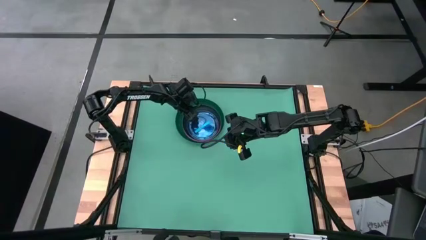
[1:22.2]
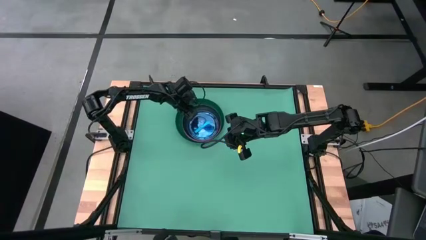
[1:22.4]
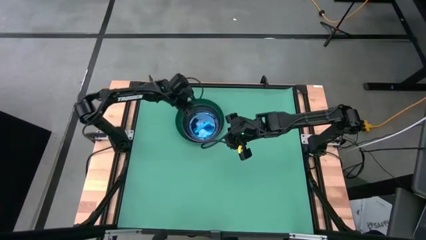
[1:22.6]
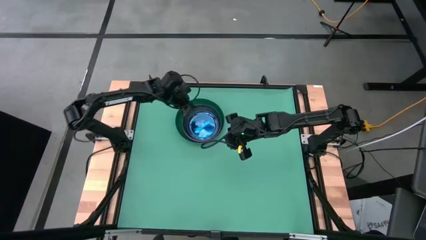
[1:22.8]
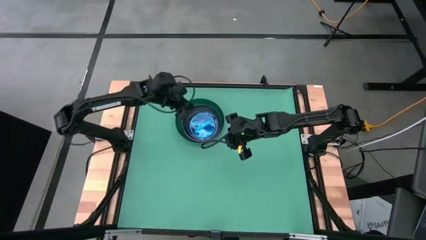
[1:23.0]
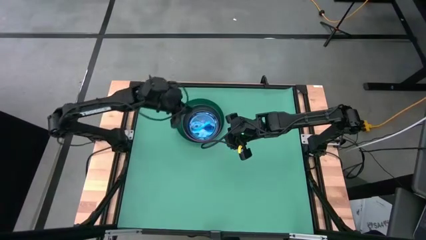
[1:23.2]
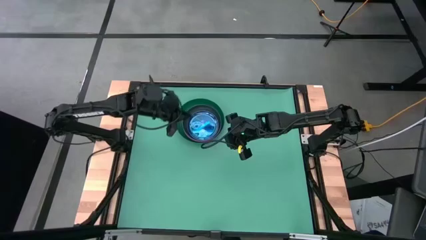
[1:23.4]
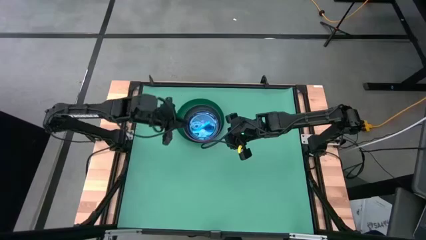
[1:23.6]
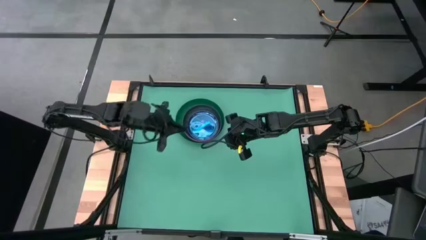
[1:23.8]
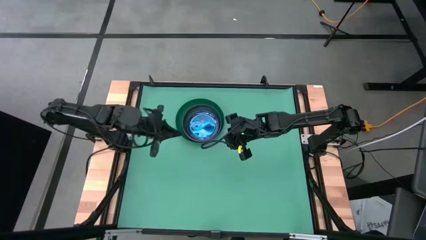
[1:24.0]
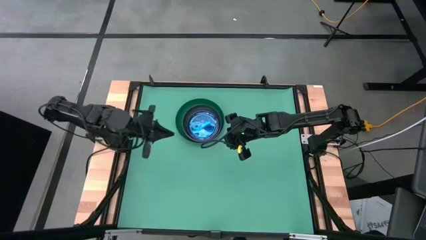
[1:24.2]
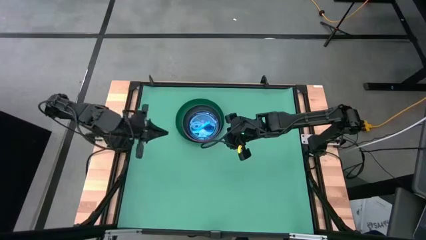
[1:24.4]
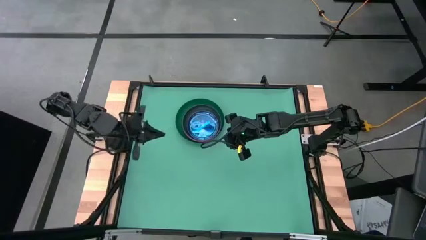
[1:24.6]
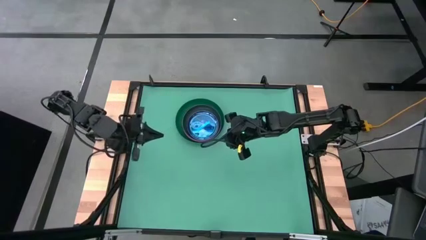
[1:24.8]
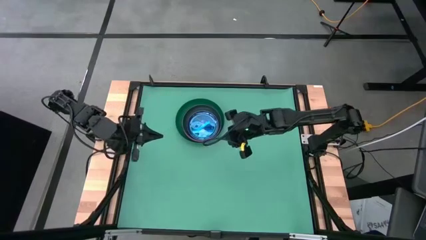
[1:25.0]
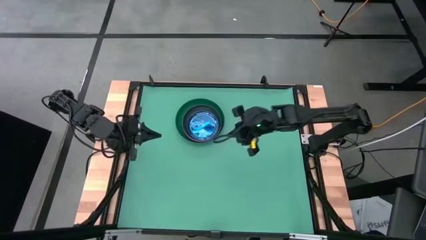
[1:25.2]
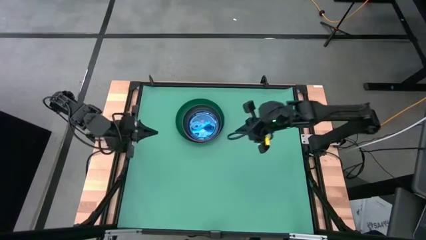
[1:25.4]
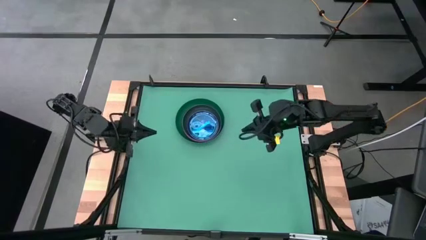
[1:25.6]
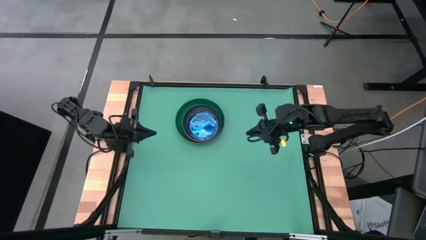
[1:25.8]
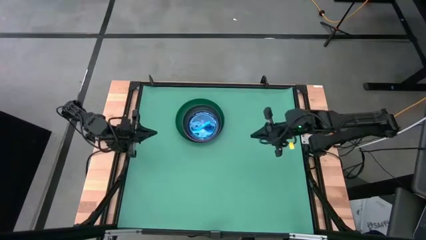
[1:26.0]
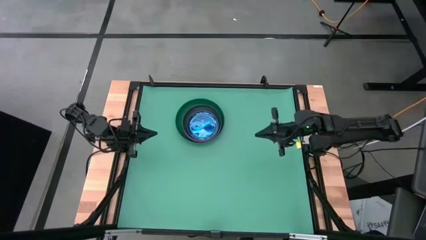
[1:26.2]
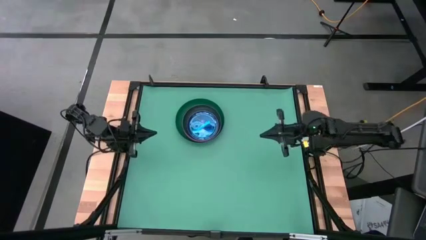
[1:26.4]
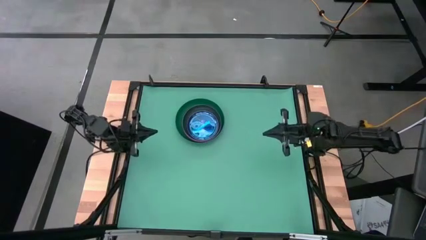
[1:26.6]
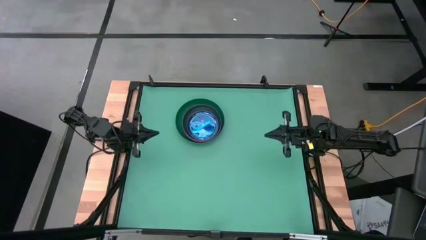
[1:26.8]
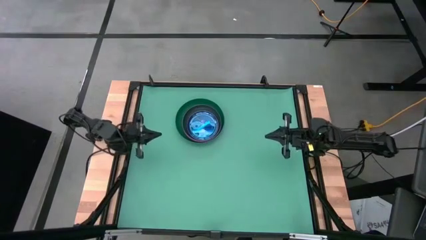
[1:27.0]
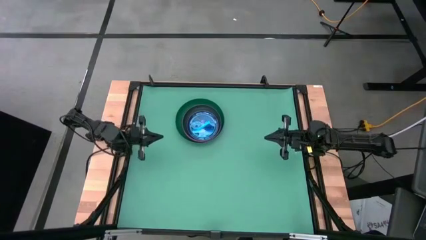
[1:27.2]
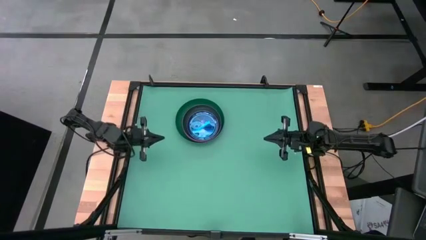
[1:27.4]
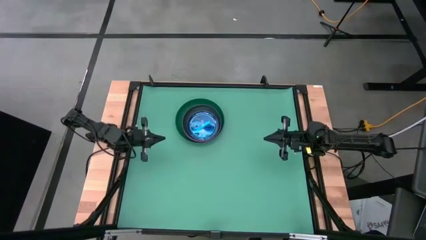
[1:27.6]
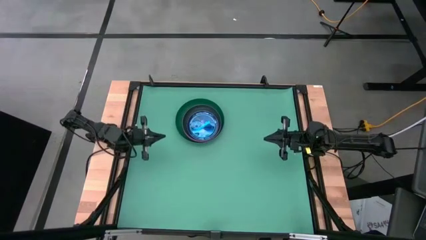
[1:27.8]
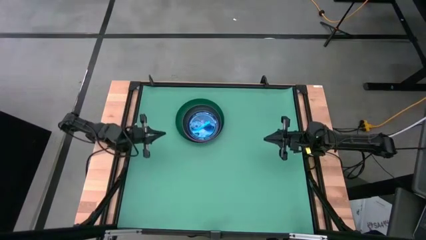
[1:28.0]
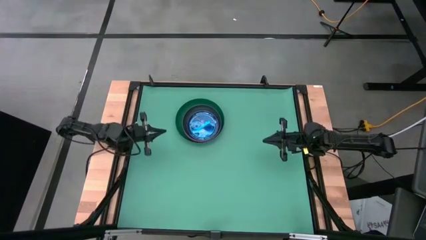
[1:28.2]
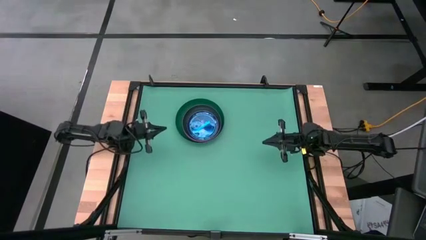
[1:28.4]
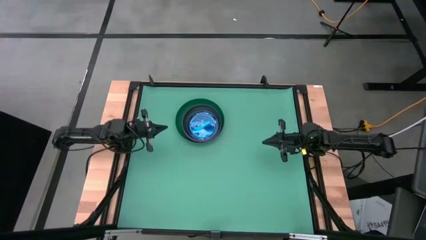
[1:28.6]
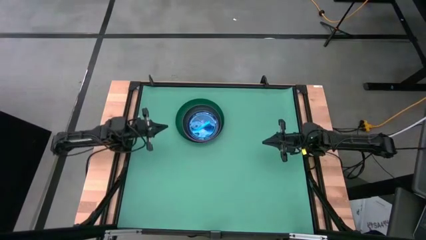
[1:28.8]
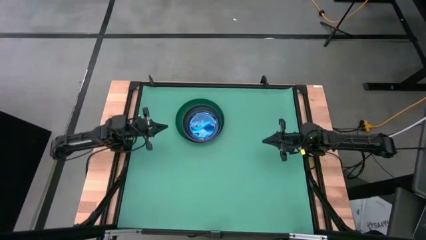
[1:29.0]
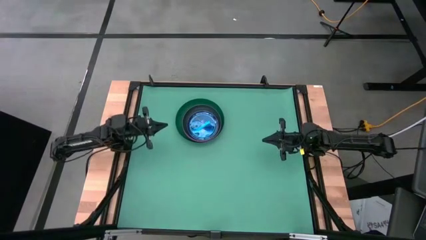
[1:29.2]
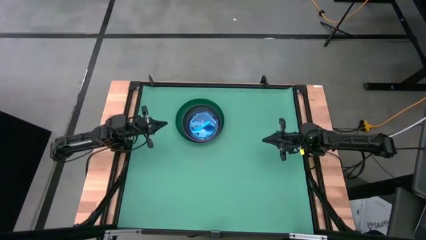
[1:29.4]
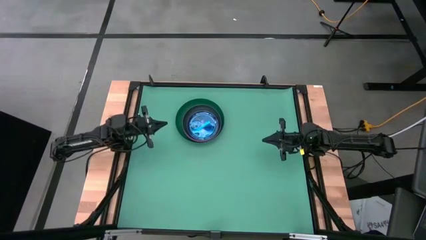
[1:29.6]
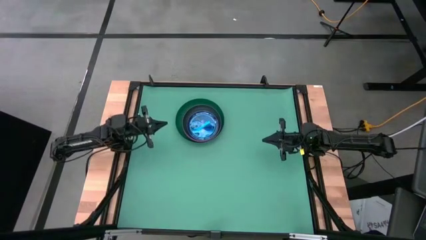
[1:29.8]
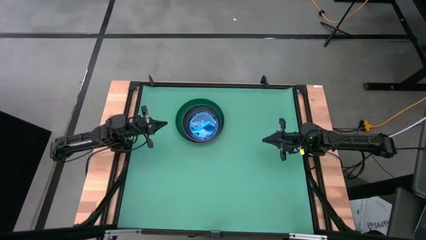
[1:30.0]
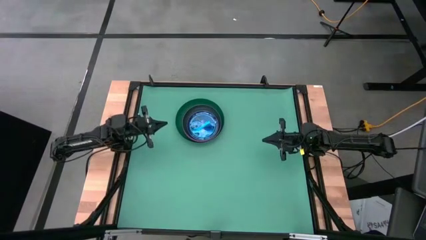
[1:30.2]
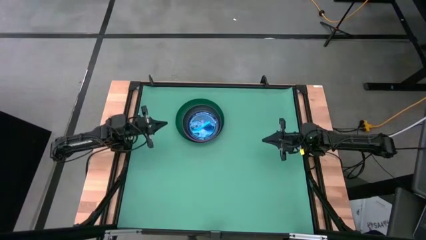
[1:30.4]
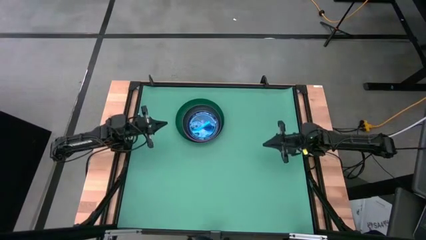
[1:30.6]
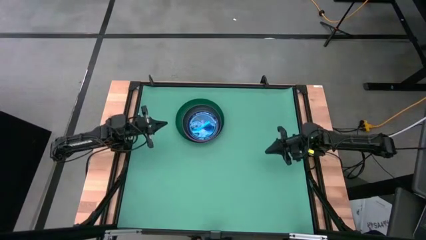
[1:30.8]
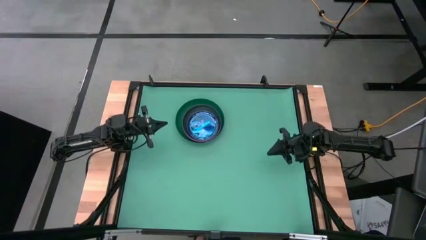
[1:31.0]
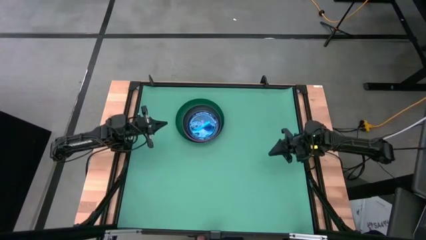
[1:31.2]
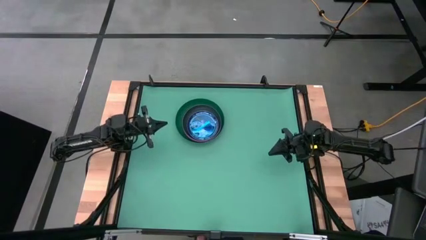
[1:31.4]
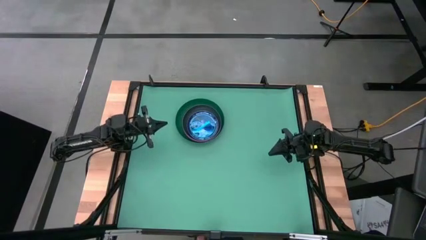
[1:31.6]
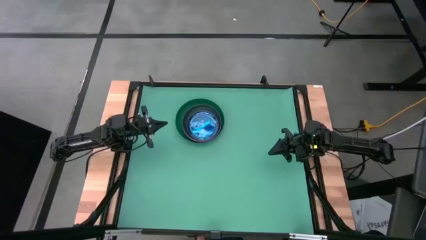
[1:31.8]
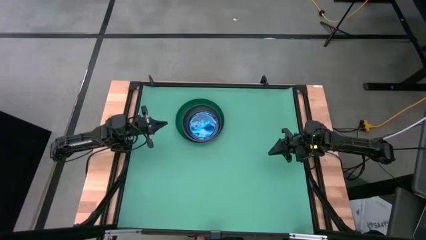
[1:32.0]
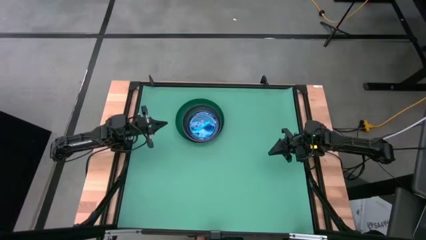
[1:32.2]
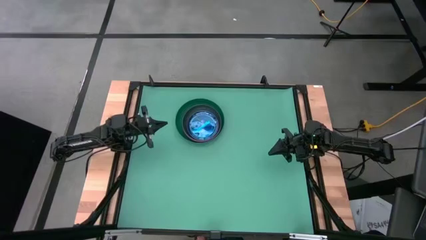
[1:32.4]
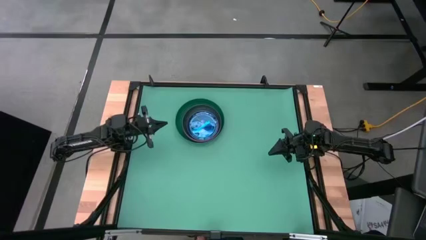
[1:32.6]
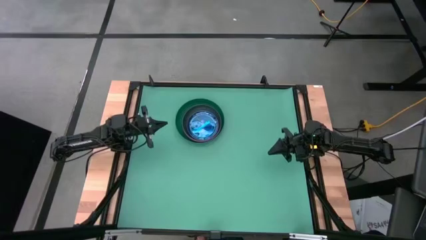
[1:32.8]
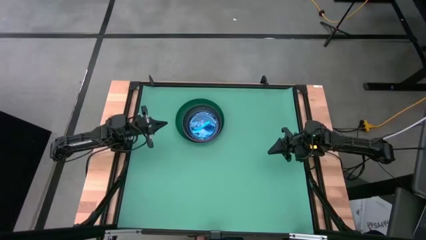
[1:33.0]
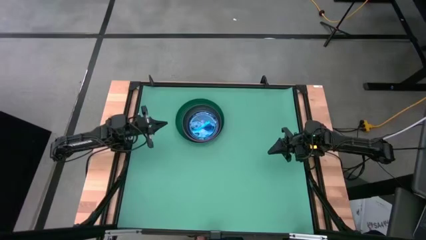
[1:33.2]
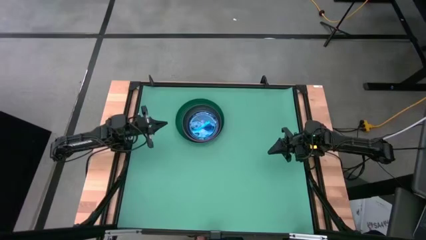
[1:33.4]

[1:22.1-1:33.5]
Task: Stack plastic plates
Return to Home Position
